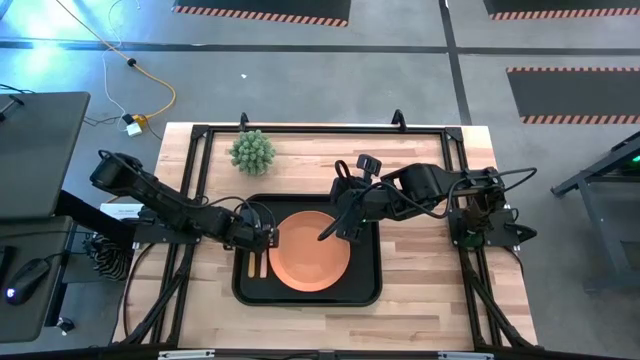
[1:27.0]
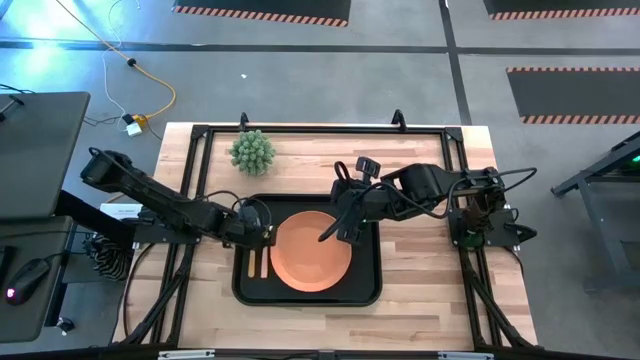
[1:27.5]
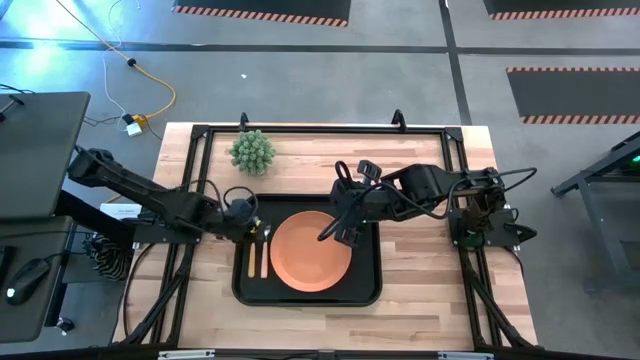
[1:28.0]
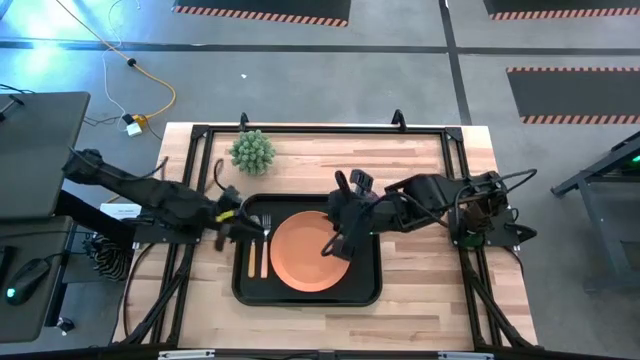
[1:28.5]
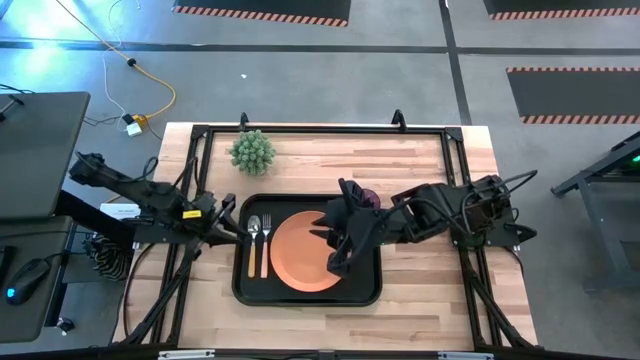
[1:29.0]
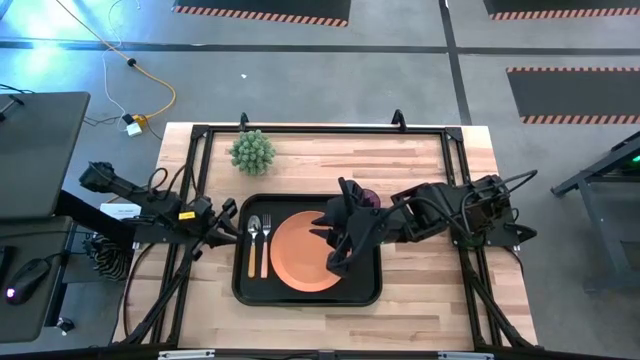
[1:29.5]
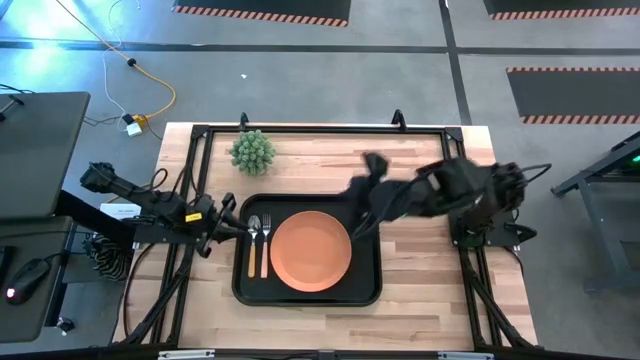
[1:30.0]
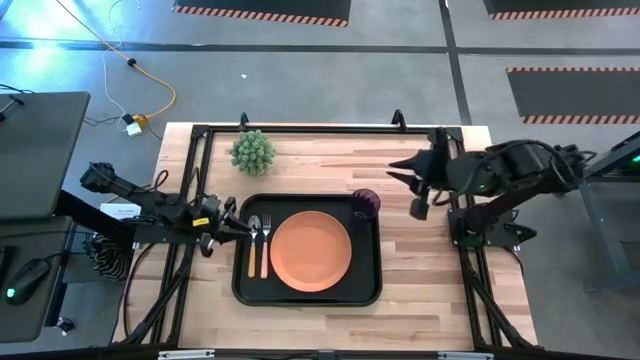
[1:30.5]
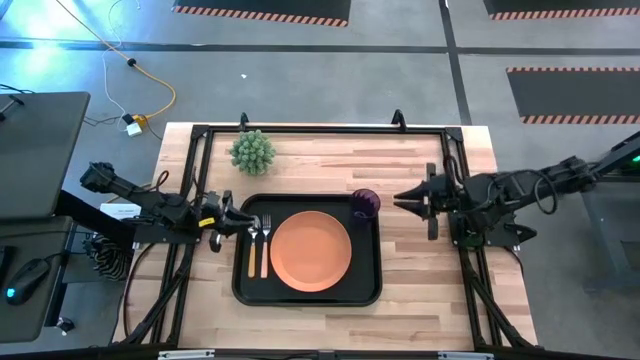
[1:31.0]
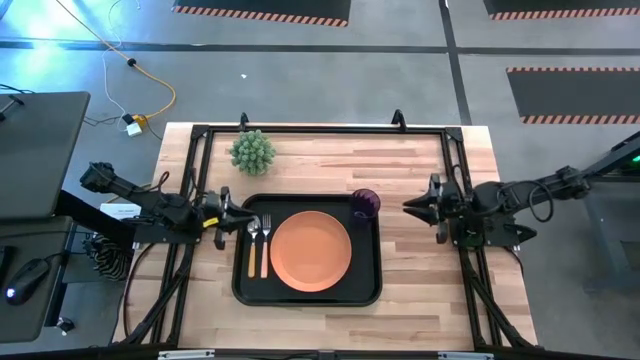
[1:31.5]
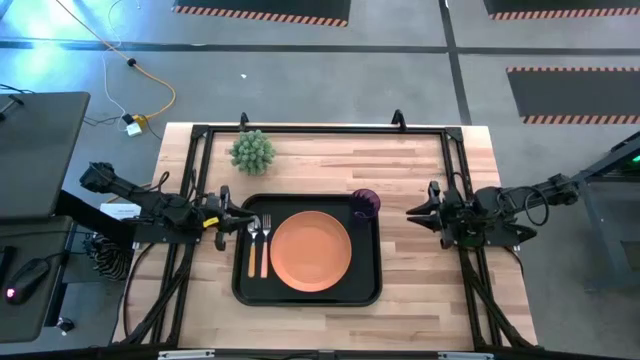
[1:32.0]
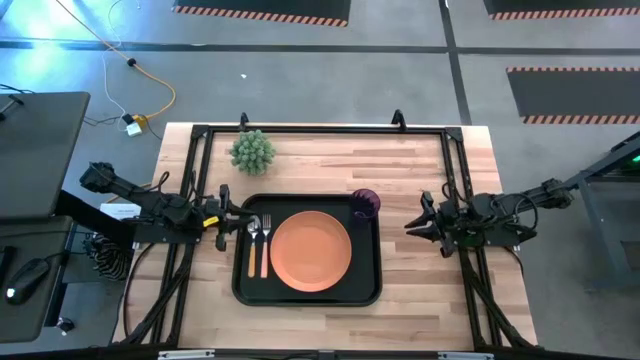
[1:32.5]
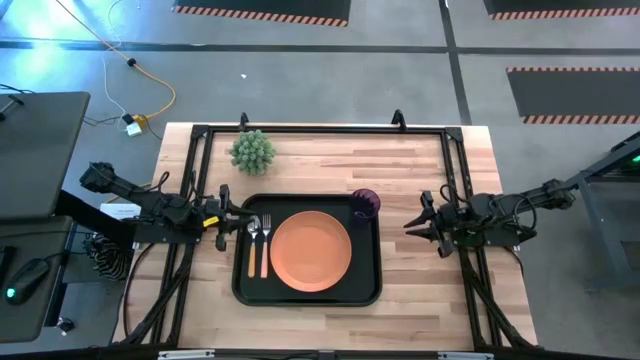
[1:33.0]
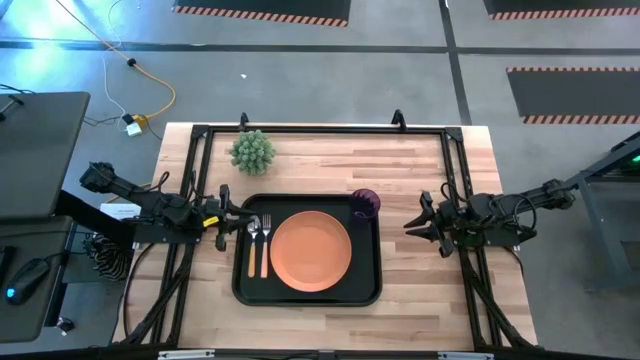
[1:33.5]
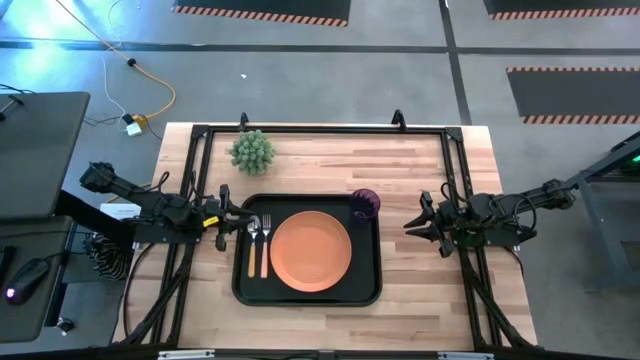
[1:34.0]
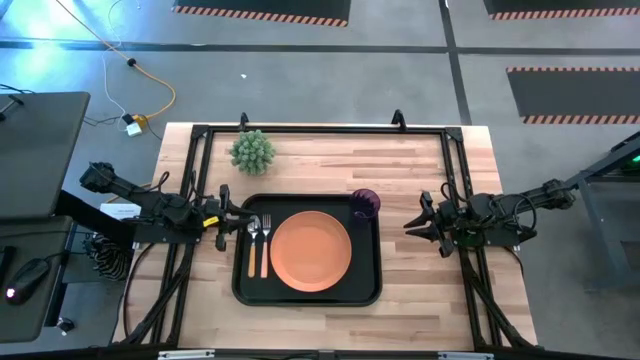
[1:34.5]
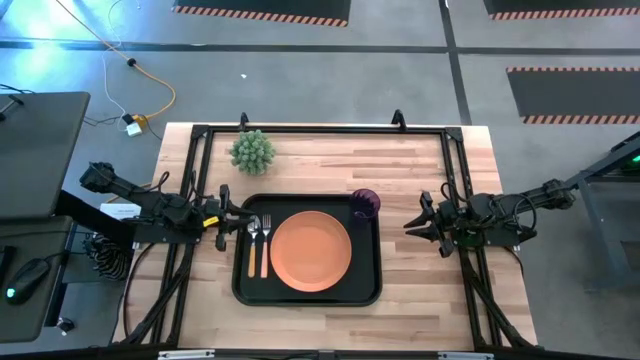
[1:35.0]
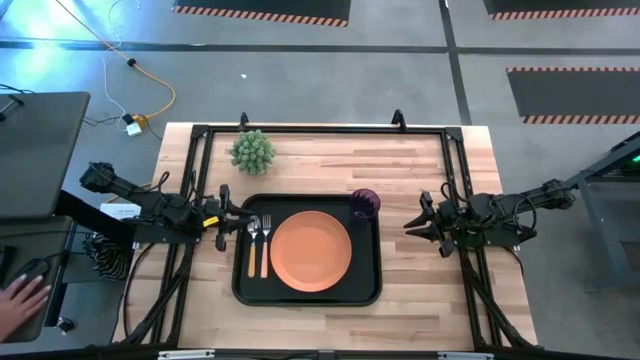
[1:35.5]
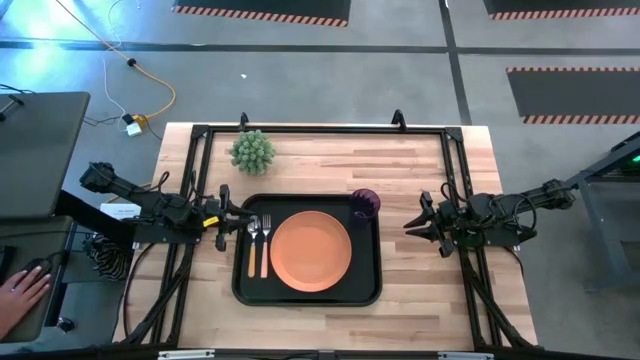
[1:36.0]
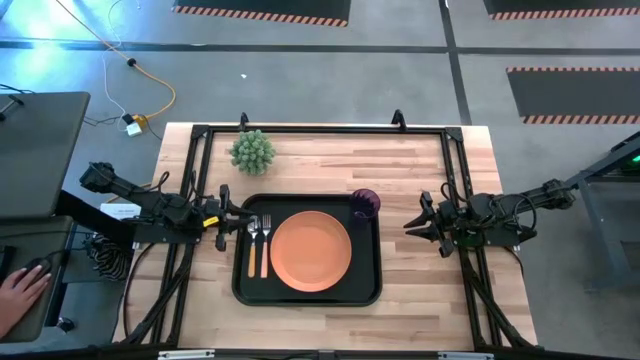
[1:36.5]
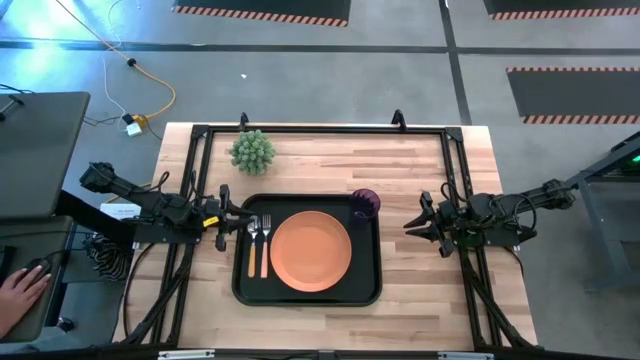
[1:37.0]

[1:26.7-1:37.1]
Task: Pick and place plate/cup/fork/spoon on tray
Return to Home Position

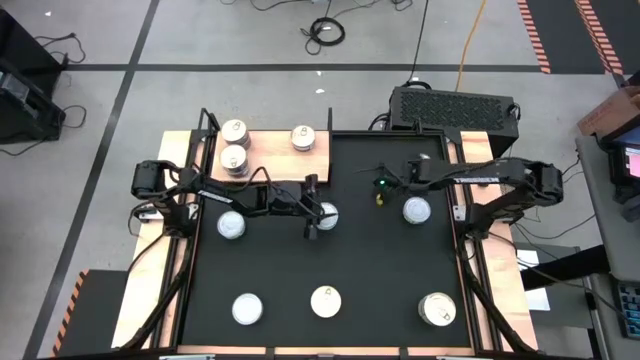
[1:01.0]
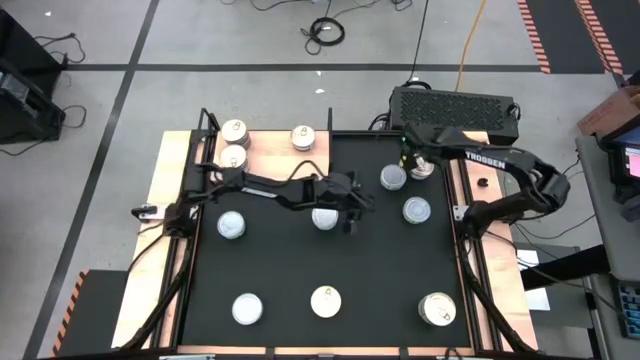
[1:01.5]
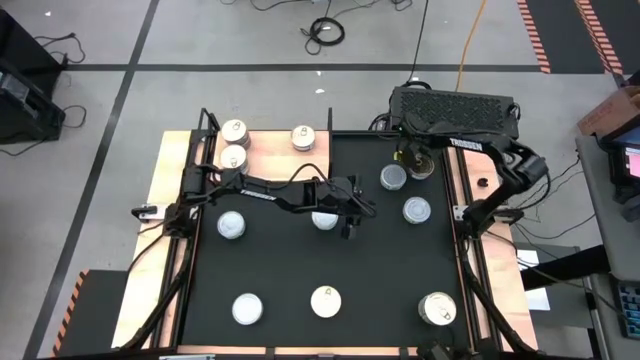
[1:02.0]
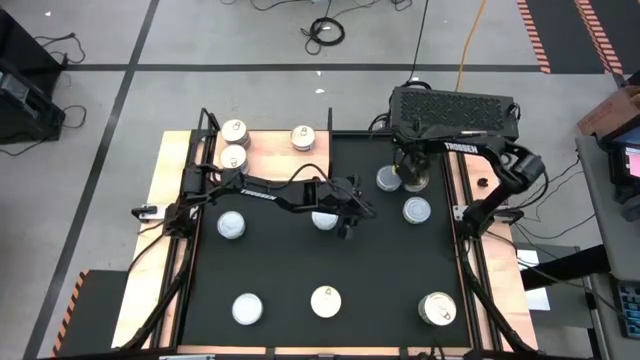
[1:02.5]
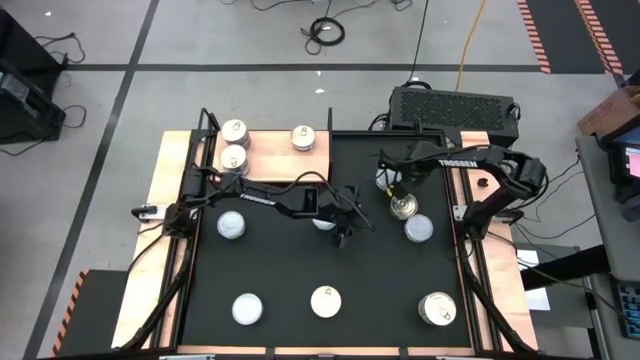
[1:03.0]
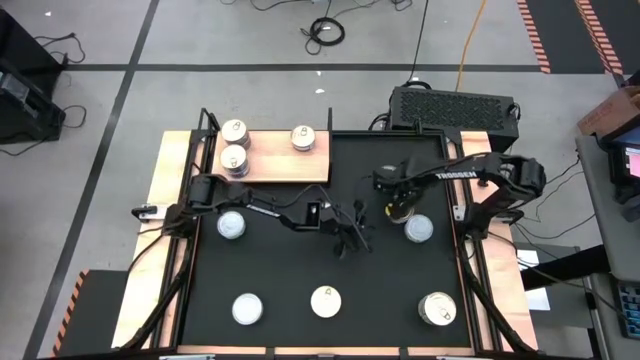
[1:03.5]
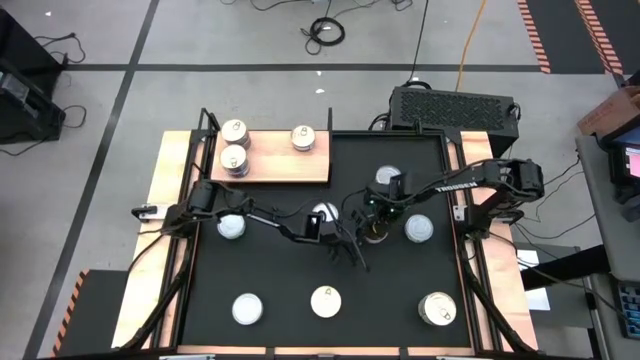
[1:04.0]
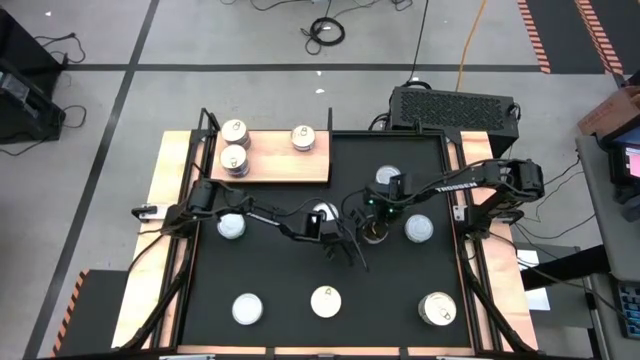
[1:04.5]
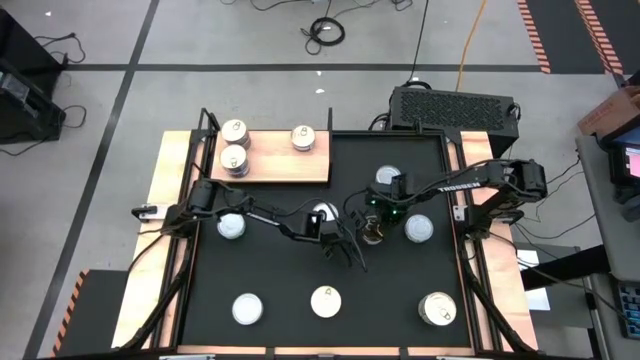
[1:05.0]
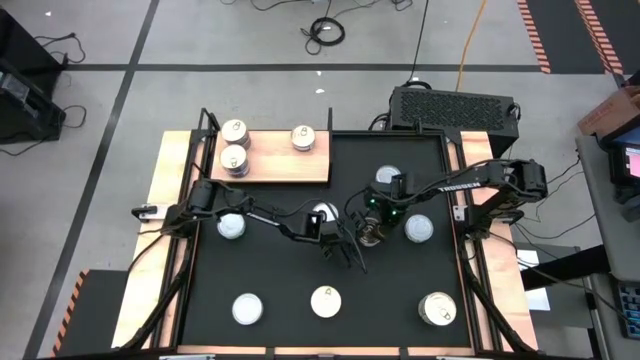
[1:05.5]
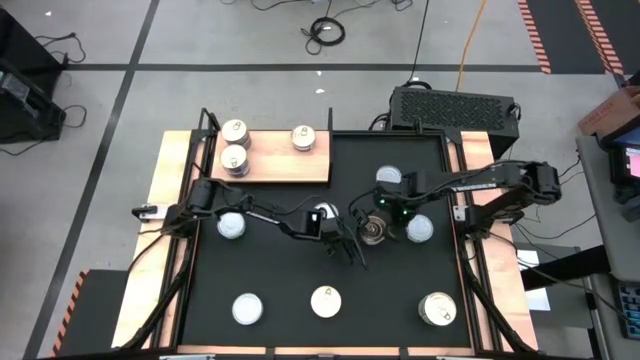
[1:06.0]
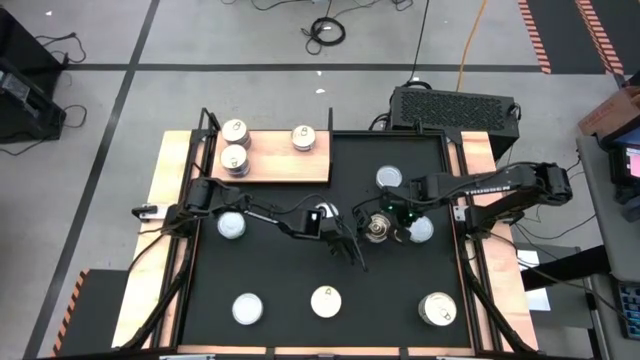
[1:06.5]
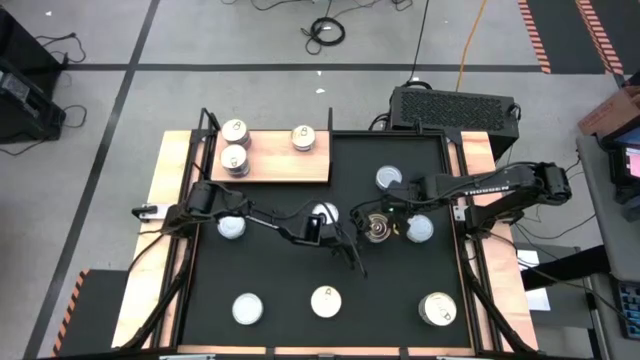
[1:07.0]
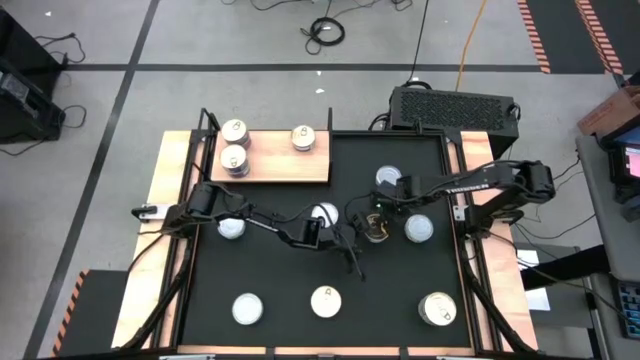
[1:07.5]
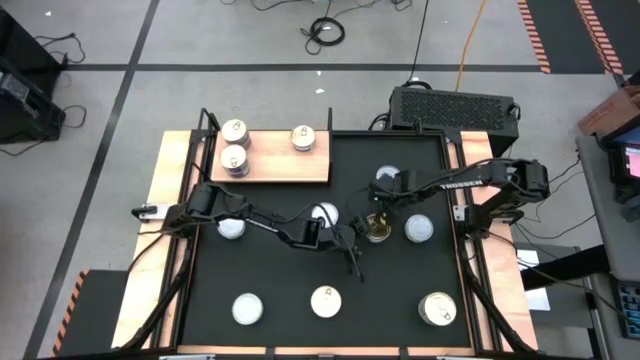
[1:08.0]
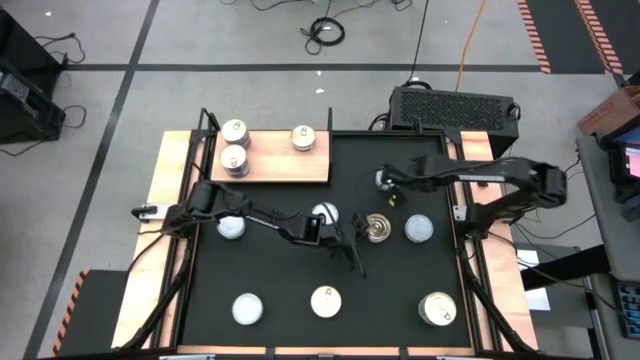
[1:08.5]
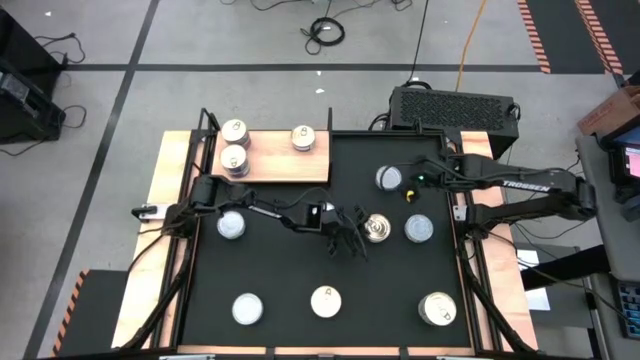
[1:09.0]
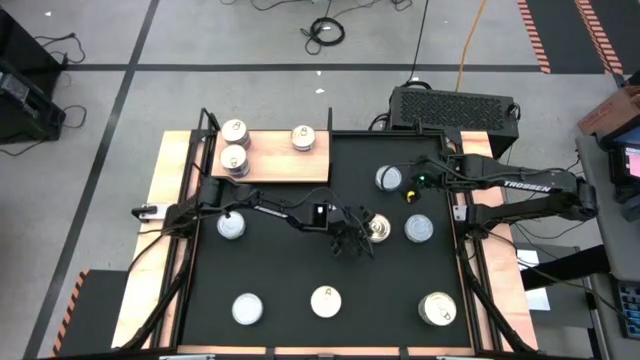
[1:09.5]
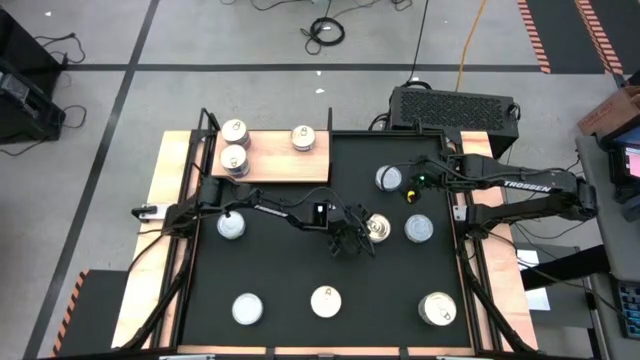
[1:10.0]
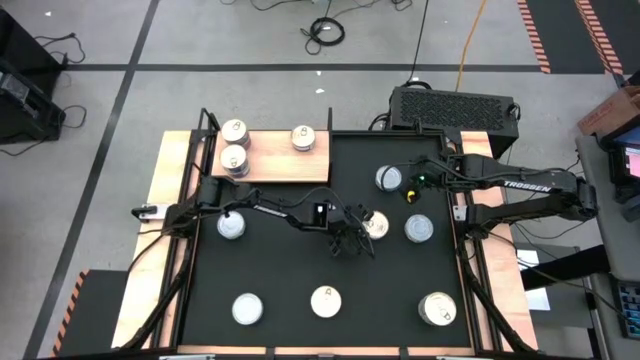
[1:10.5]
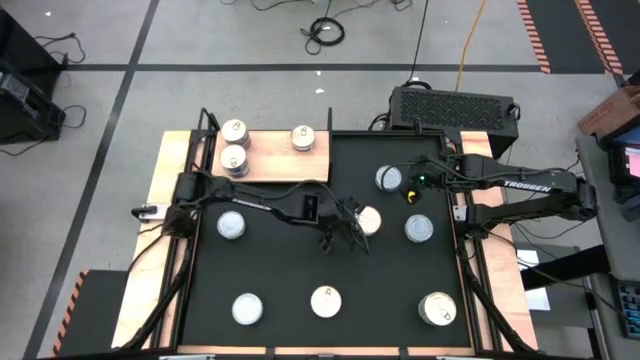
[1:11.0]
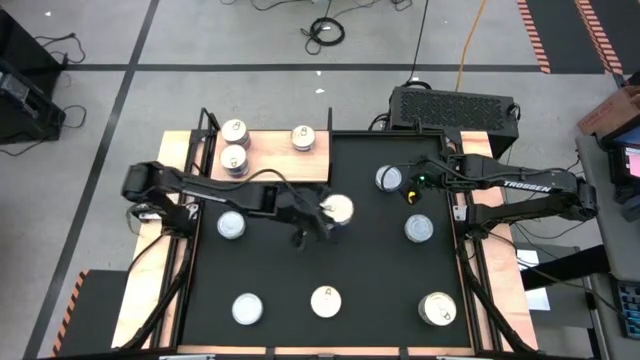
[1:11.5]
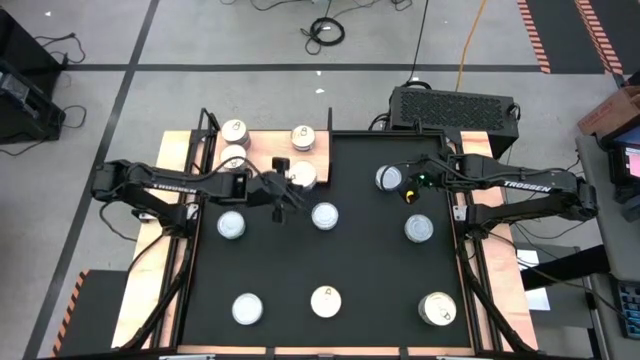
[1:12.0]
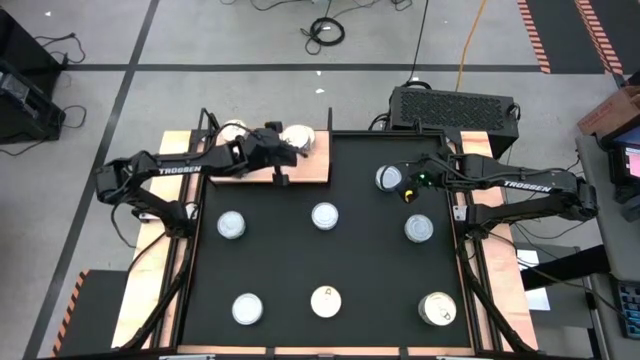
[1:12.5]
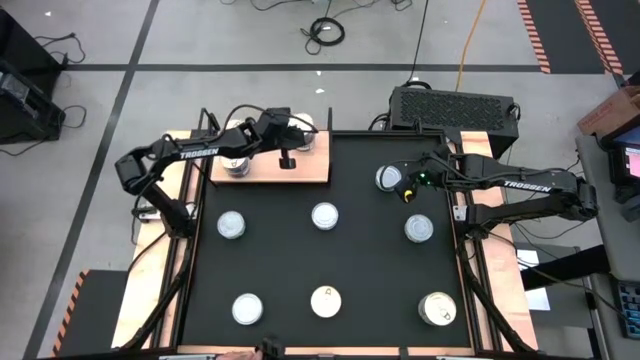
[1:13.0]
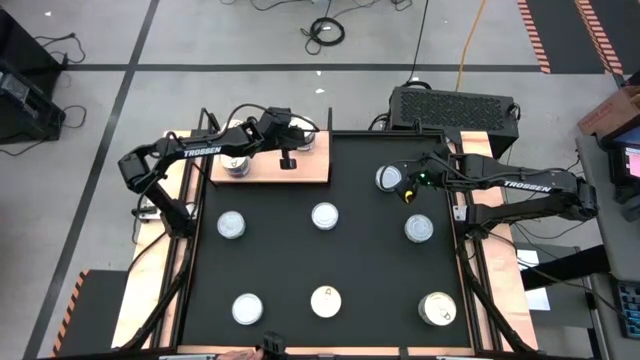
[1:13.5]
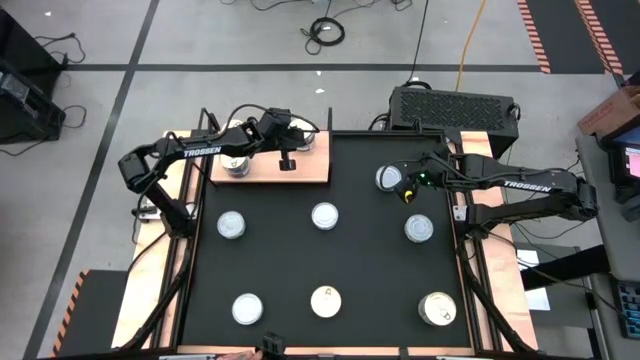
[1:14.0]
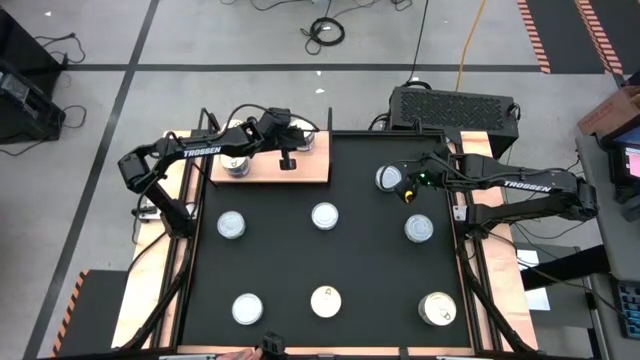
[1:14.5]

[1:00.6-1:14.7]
Task: Stack canned seafood by type on shelf
Stack the blue tuna can on top of the blue tuna can on the shelf
